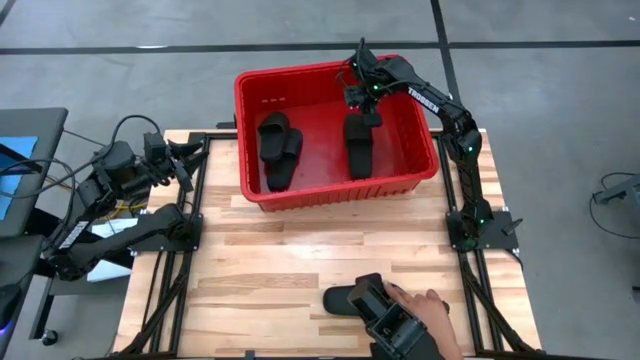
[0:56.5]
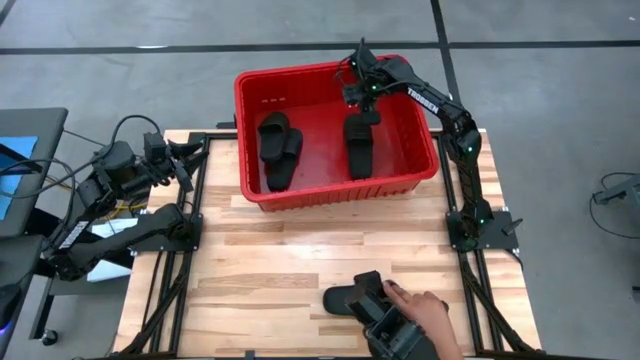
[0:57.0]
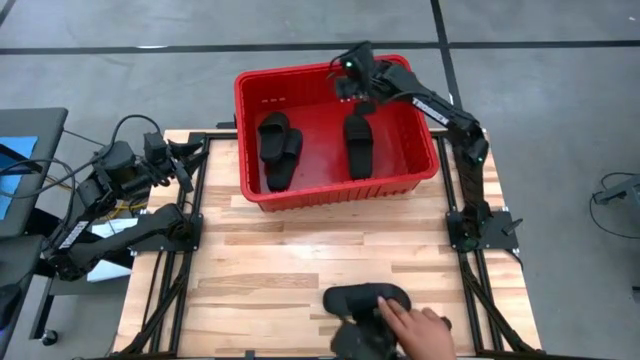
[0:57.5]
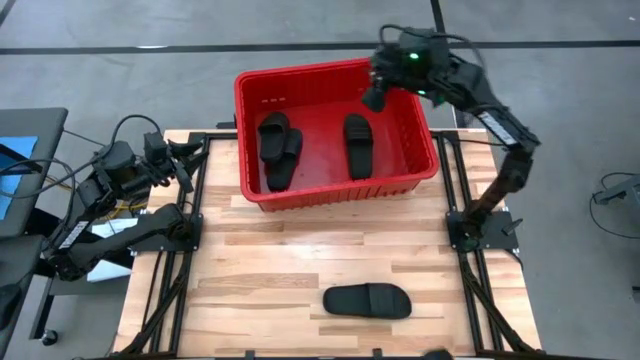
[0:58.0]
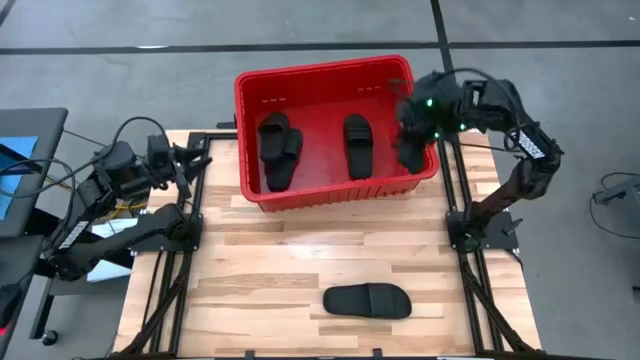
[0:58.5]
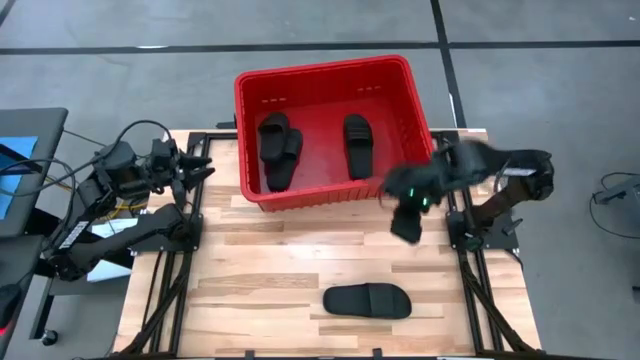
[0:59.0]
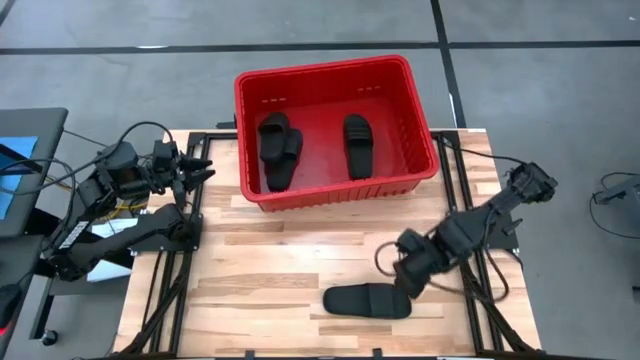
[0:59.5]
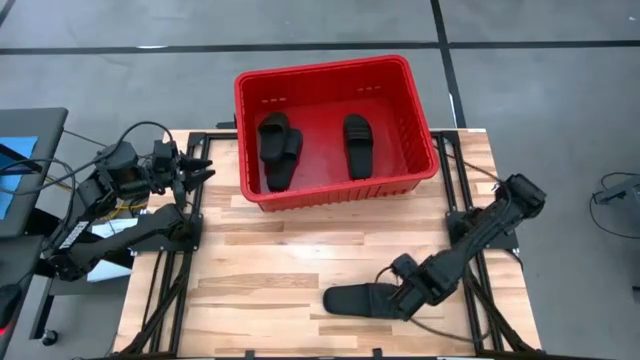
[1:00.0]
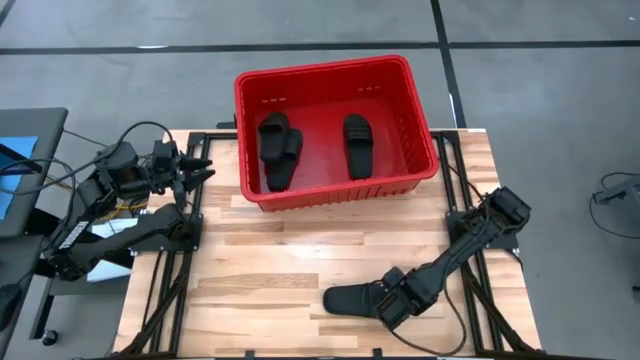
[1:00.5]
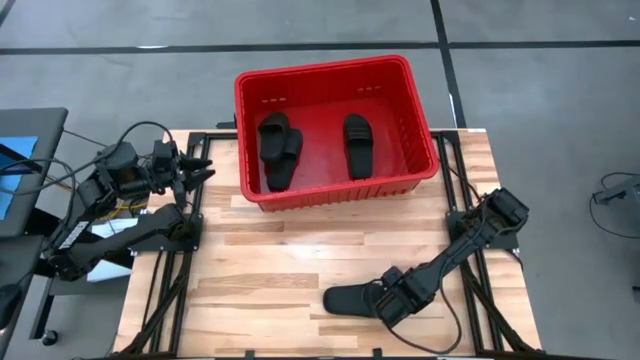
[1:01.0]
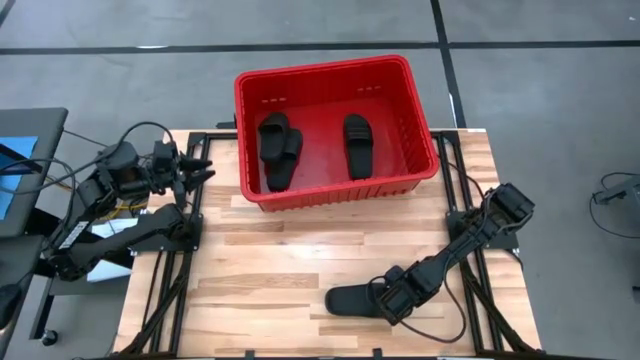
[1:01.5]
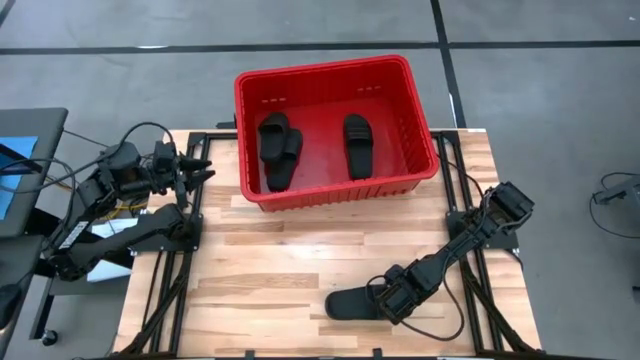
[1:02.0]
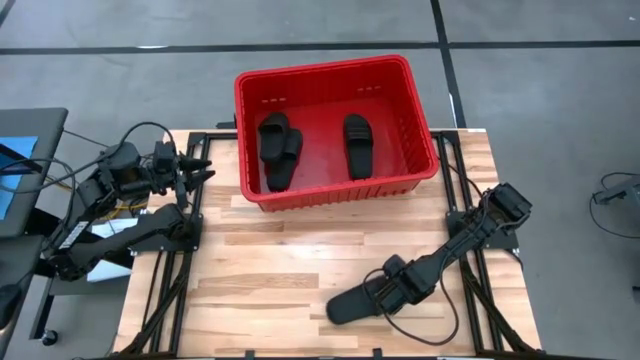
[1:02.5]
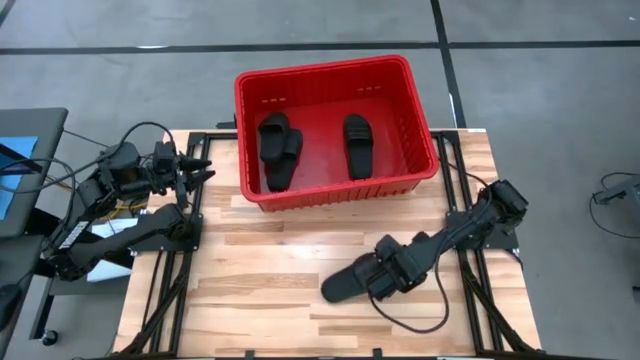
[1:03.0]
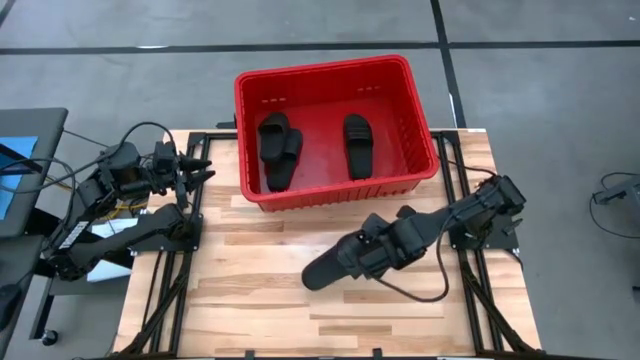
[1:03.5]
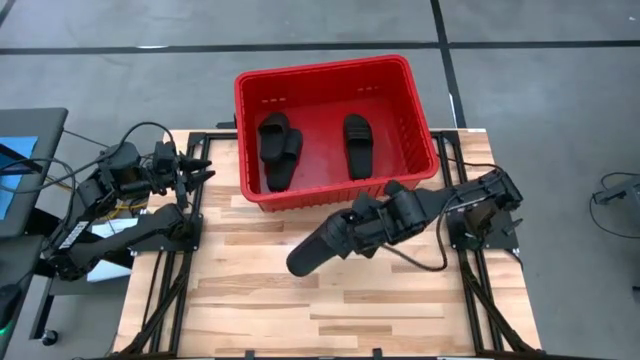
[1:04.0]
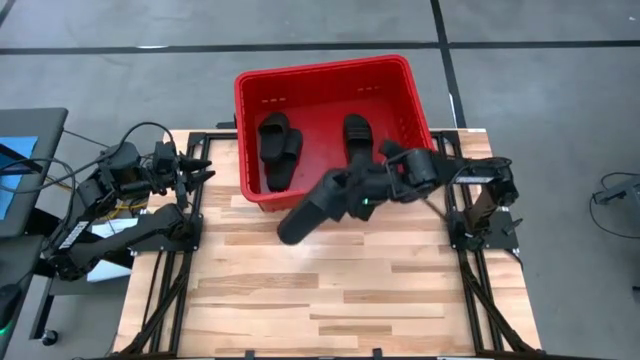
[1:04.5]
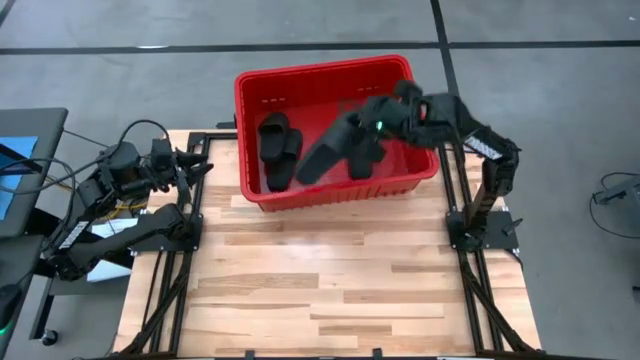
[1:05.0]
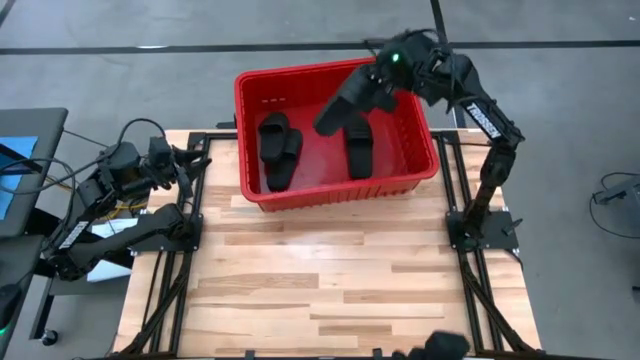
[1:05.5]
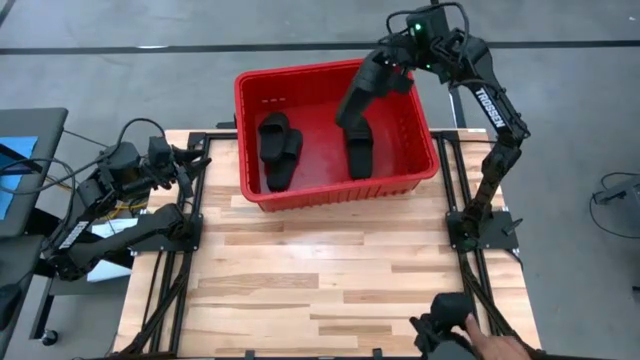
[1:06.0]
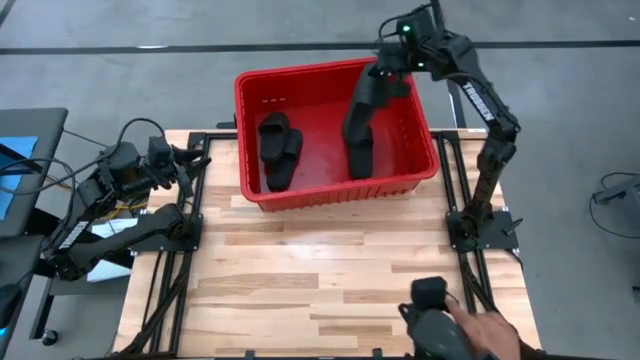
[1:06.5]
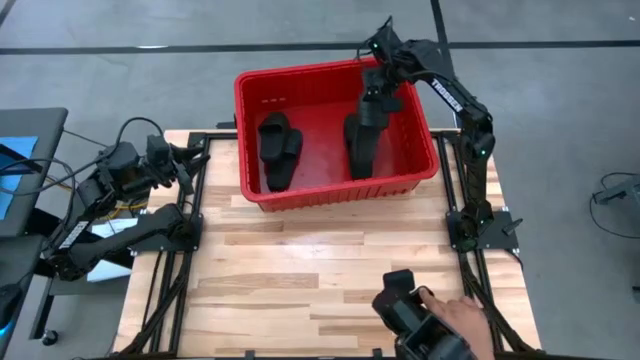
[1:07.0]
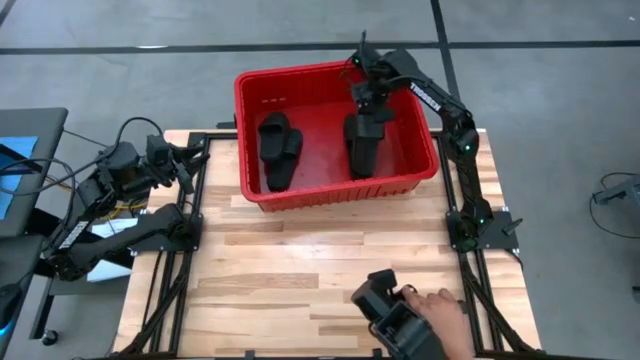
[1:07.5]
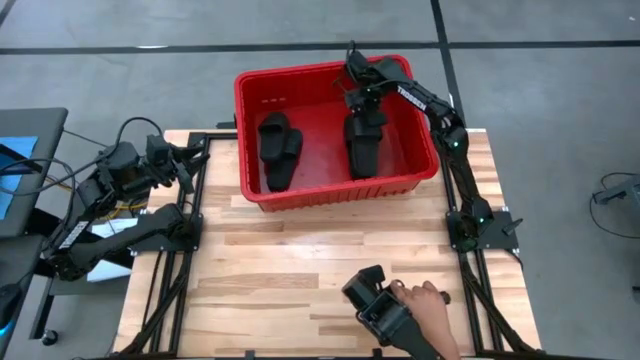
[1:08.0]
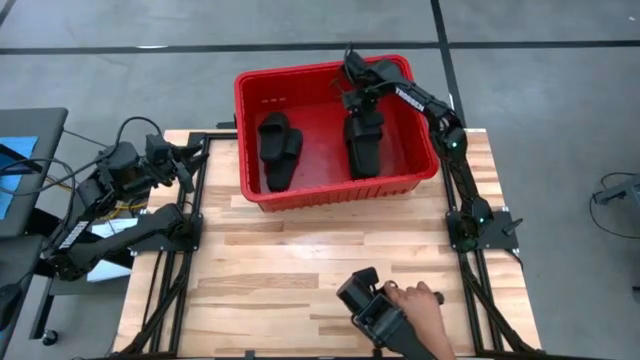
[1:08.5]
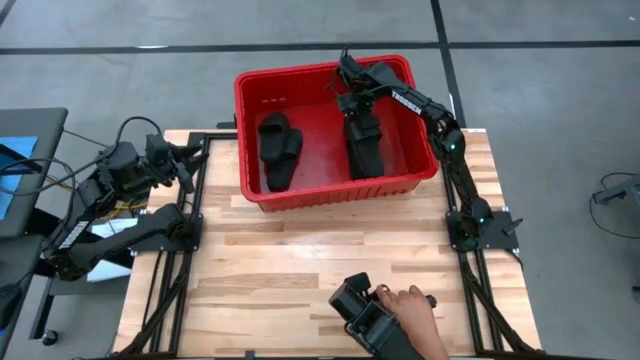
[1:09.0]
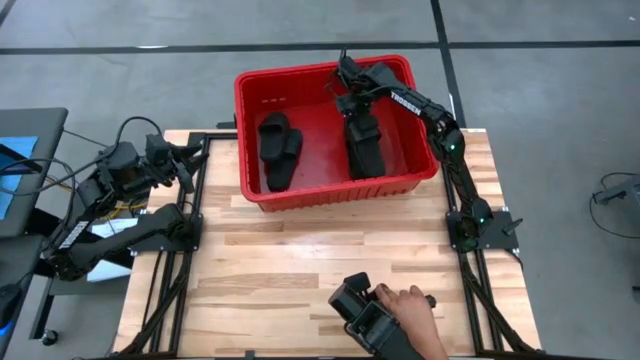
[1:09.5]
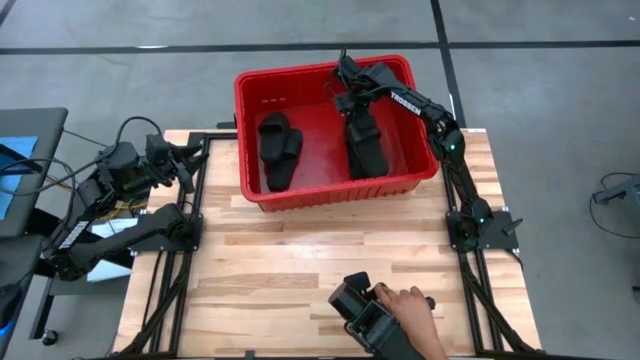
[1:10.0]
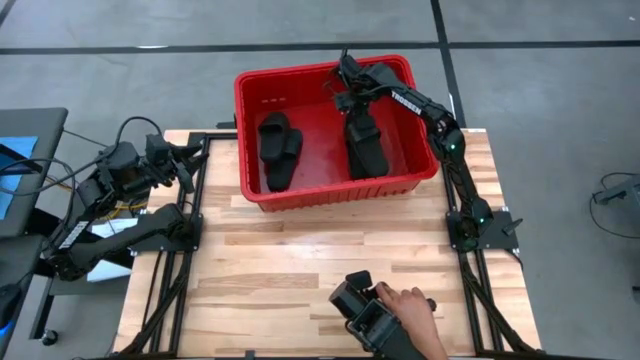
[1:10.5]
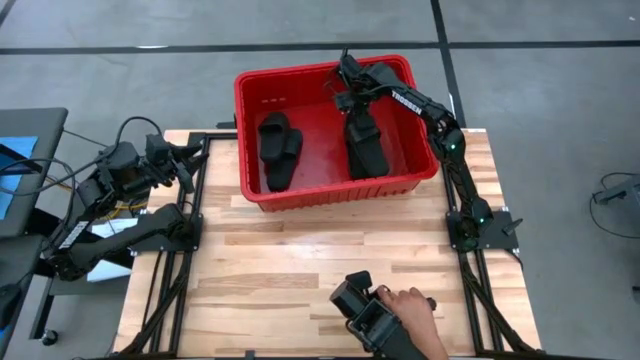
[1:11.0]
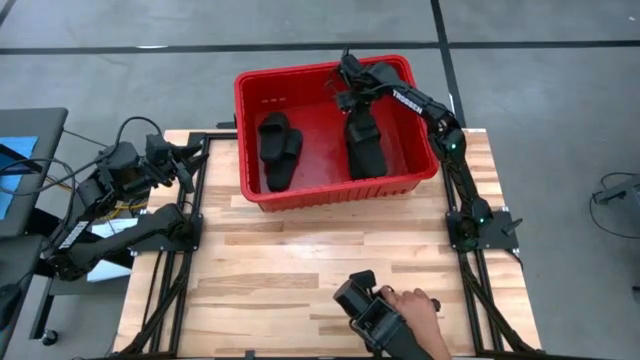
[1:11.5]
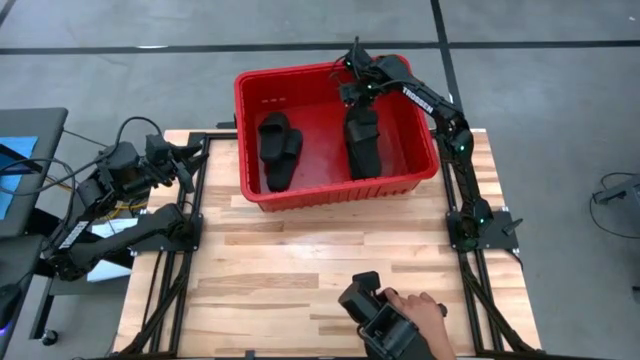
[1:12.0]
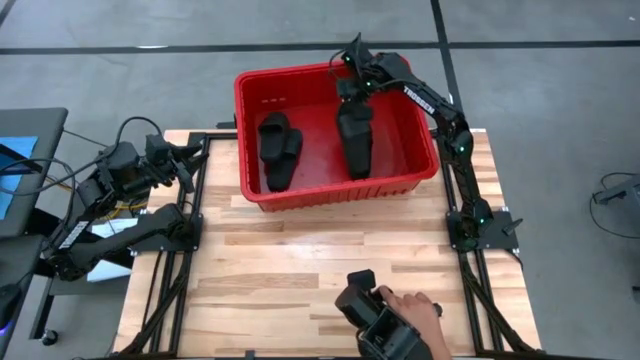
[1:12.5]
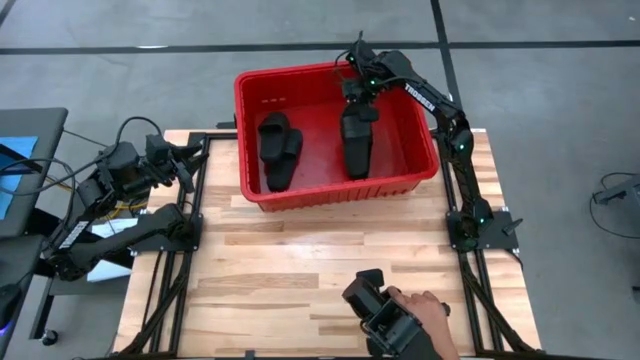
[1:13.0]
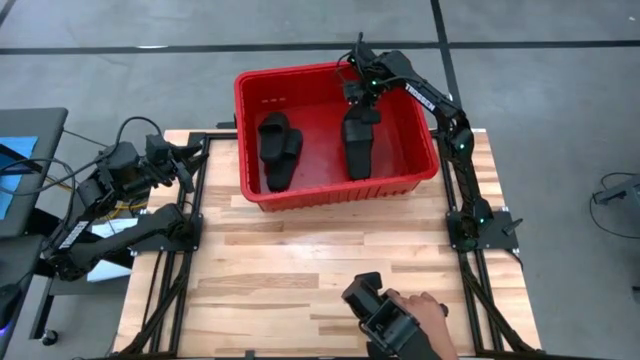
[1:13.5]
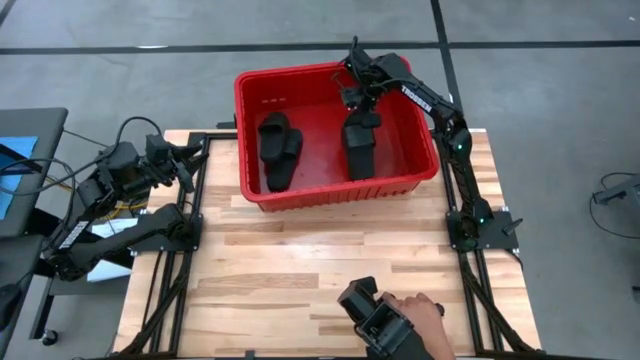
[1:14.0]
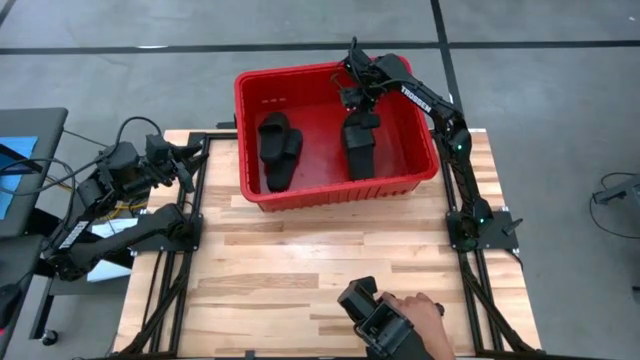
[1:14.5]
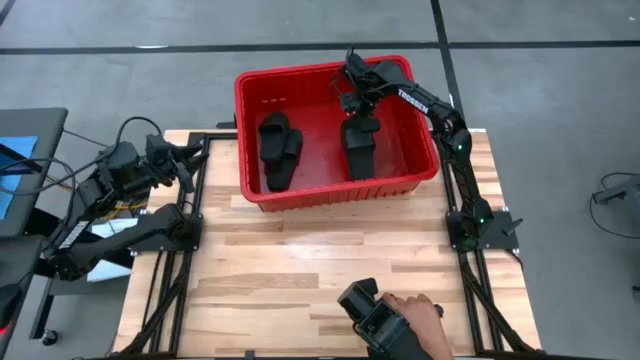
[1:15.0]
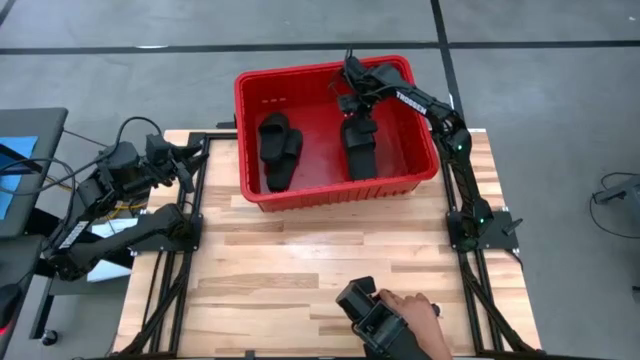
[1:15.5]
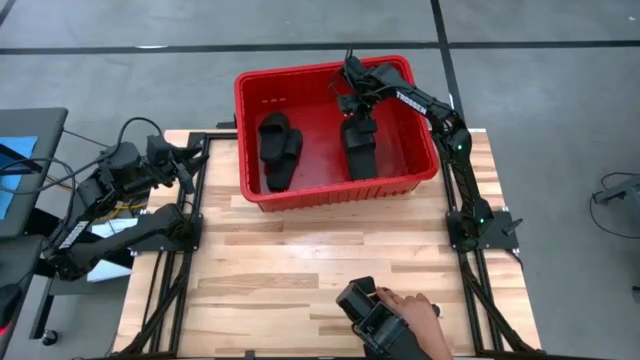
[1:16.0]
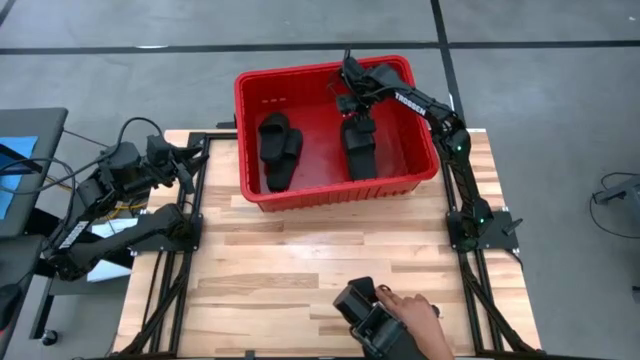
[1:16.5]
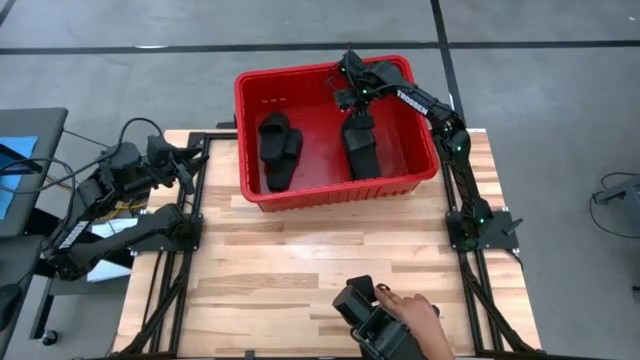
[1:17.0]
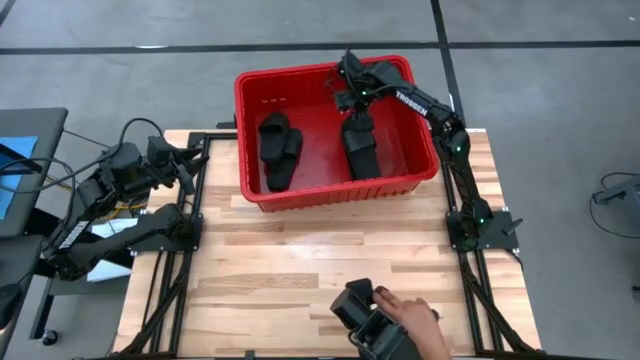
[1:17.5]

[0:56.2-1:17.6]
Task: Pick and place slides into bin
Put the black slide into the red bin
